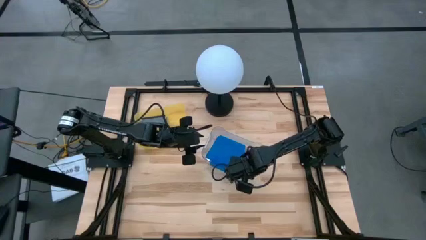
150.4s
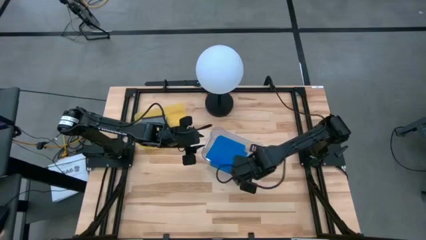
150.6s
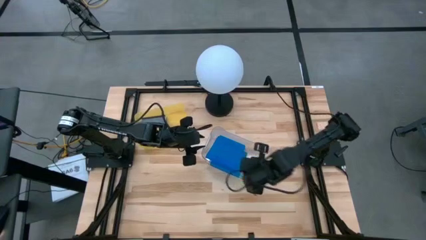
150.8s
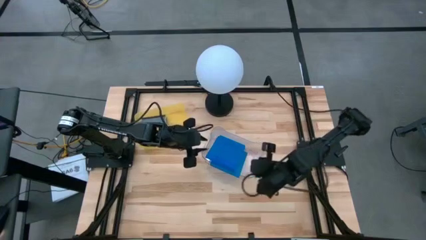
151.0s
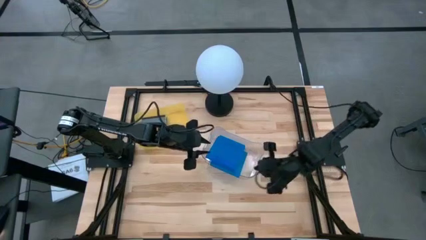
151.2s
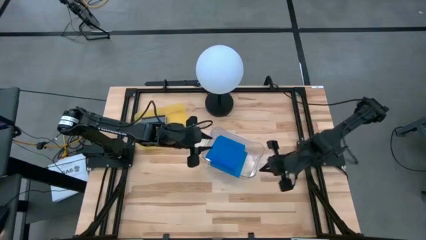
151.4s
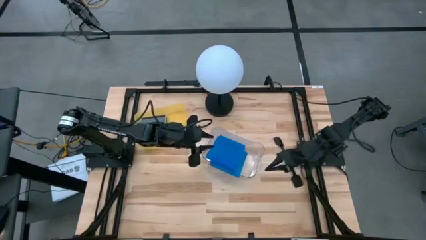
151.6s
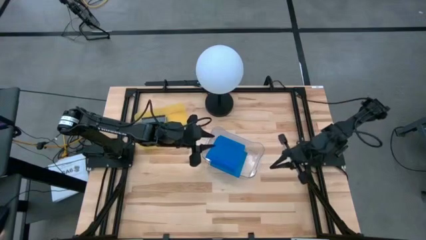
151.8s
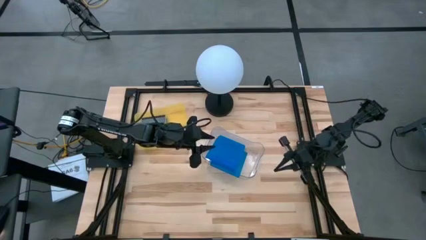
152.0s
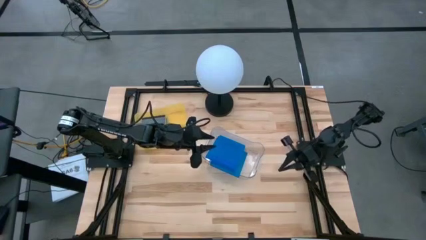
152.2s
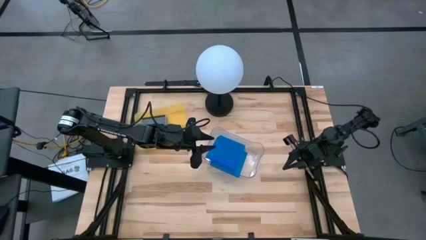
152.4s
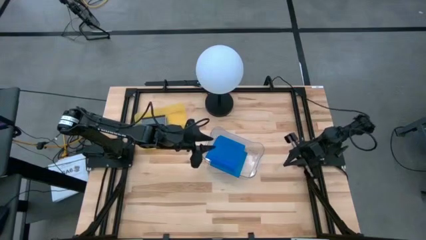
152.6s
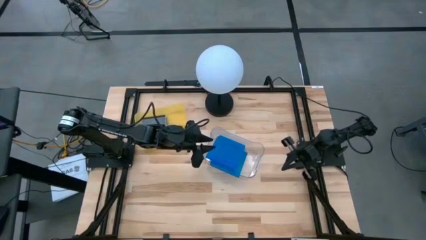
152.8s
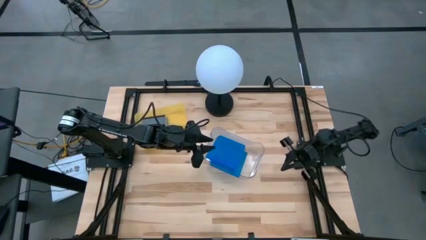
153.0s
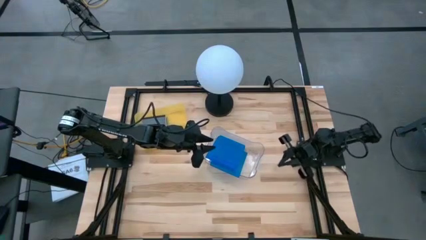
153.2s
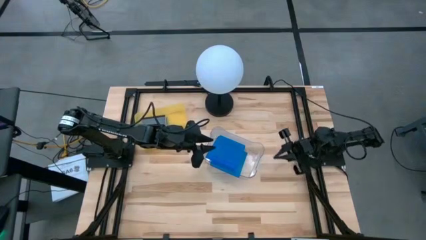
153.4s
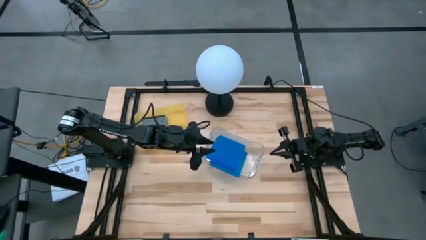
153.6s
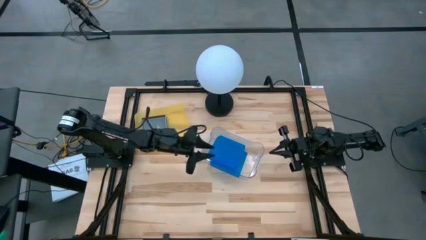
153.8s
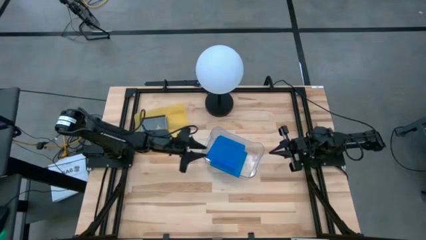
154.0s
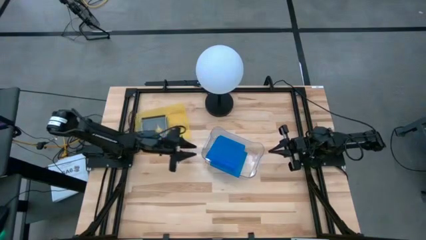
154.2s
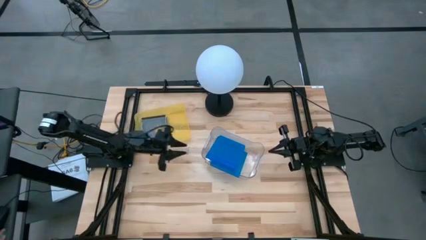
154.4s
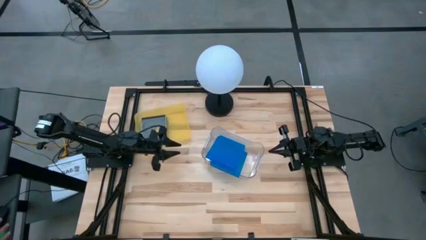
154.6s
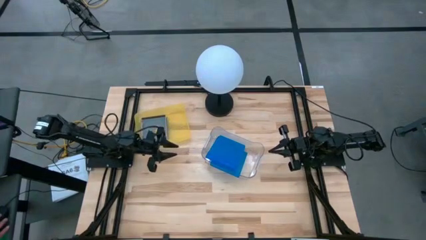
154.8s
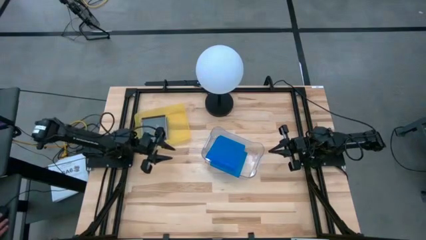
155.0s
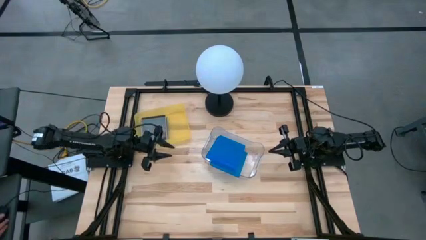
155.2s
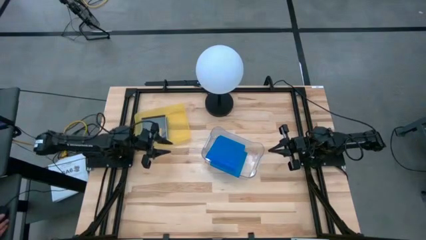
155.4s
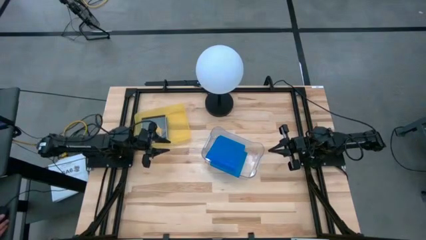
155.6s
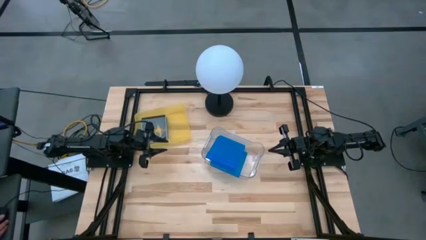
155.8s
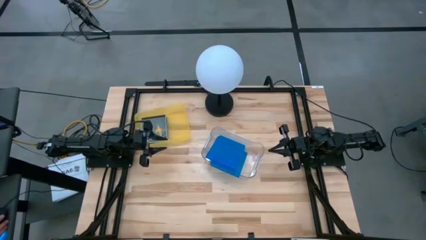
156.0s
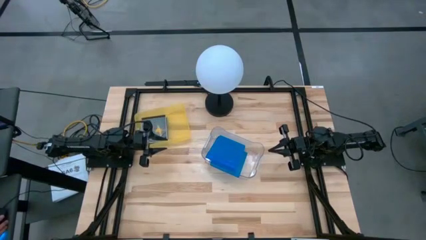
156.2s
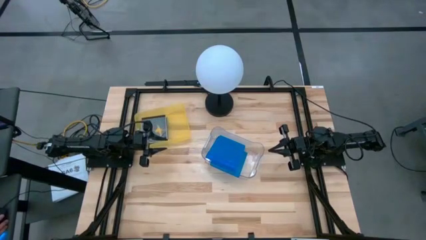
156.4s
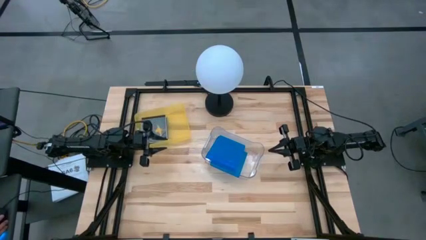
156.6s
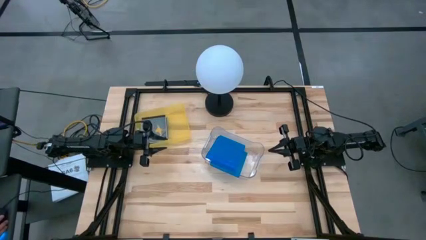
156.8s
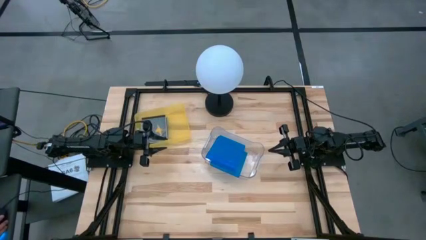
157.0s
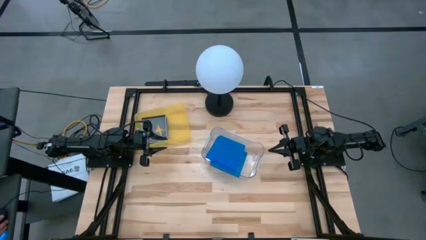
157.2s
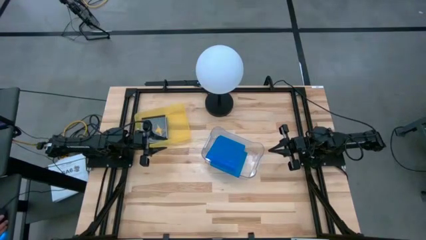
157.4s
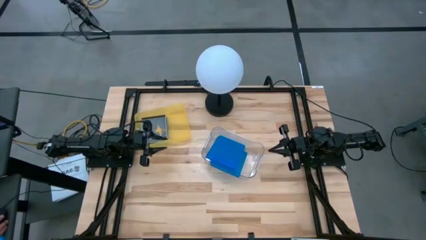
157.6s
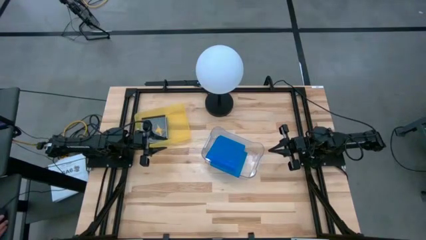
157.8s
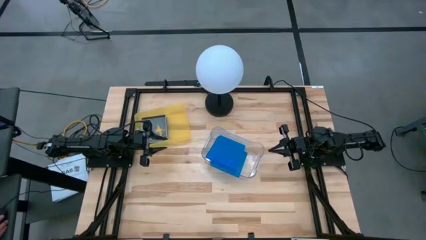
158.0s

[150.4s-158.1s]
Task: Pick & place jewel cases by type
Return to Home Position

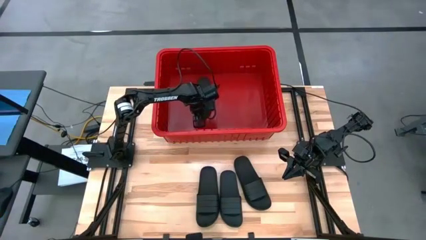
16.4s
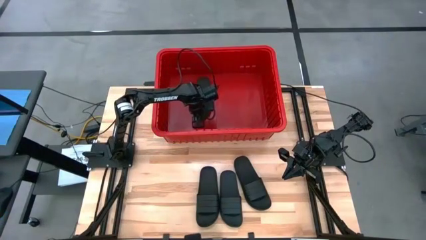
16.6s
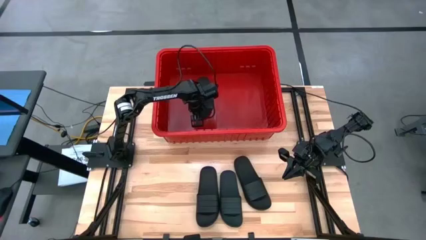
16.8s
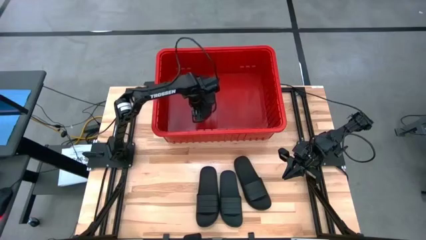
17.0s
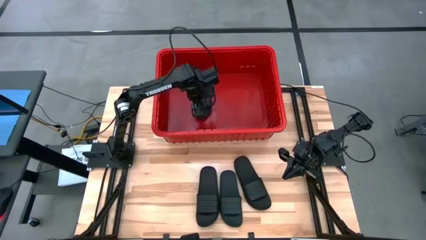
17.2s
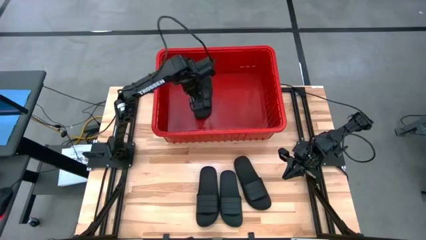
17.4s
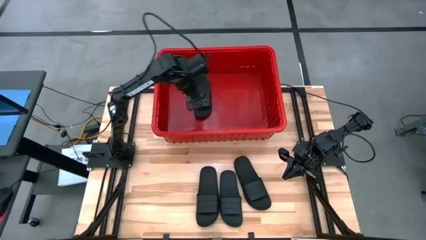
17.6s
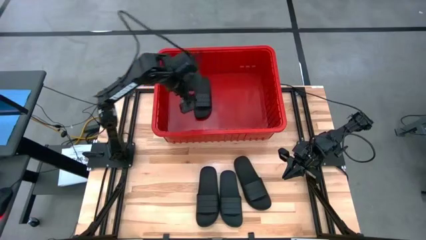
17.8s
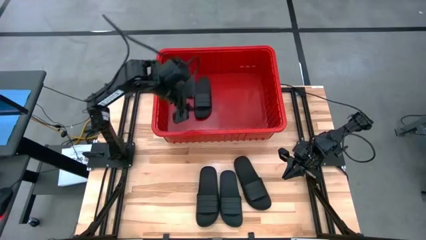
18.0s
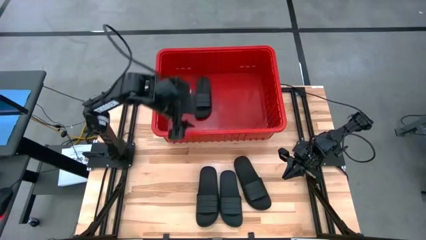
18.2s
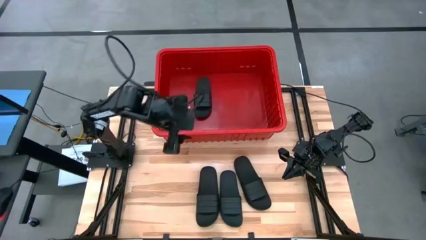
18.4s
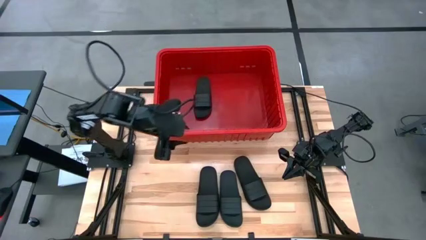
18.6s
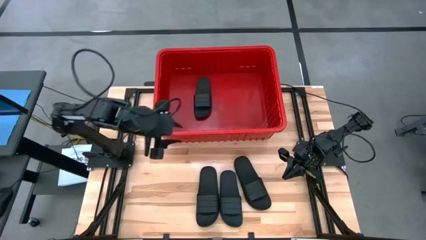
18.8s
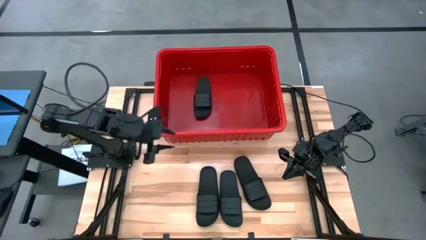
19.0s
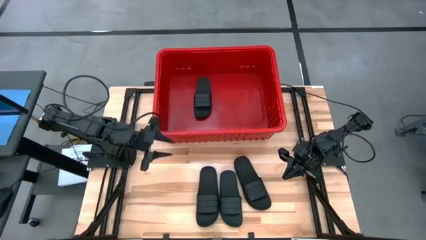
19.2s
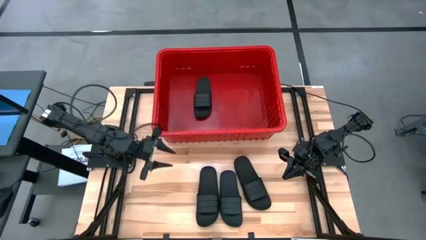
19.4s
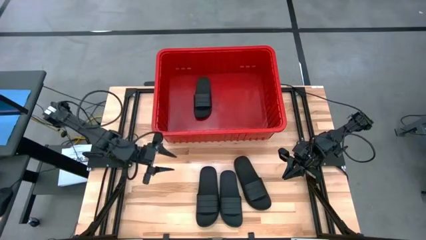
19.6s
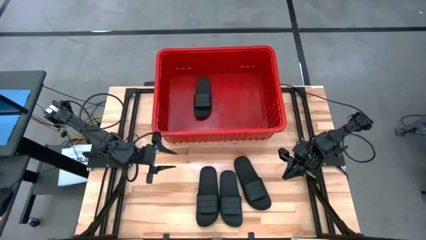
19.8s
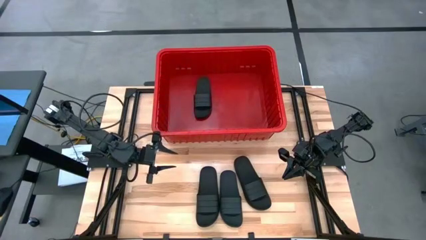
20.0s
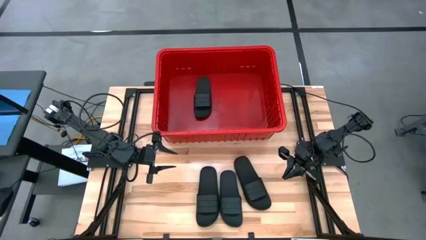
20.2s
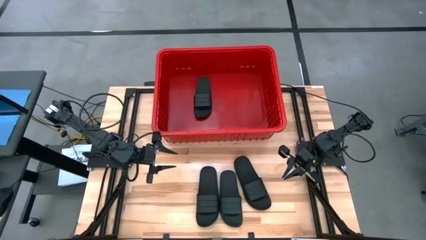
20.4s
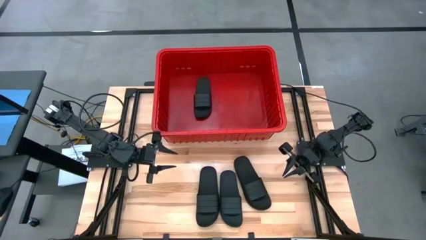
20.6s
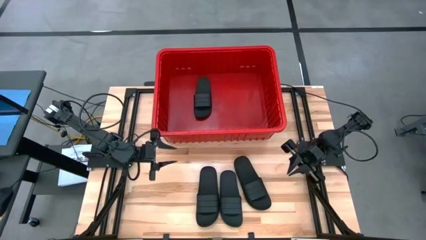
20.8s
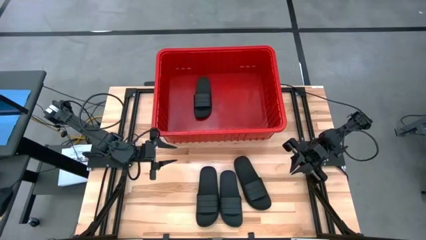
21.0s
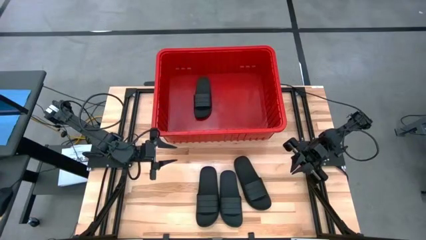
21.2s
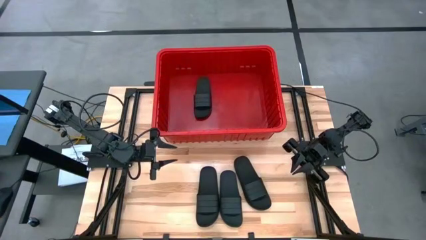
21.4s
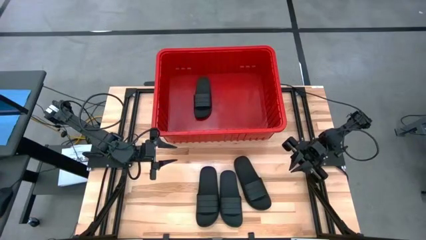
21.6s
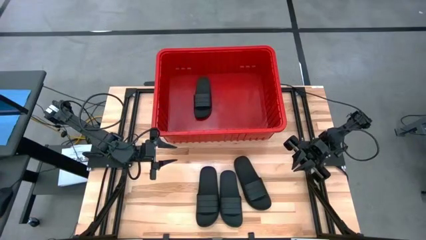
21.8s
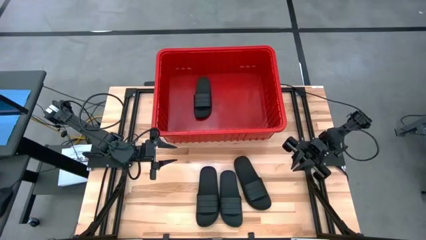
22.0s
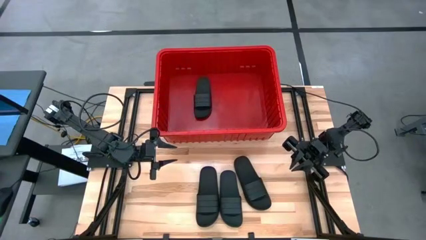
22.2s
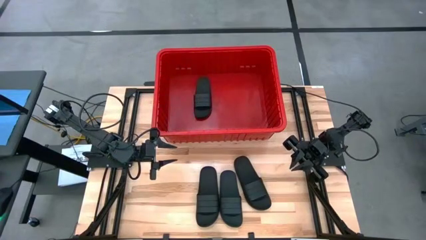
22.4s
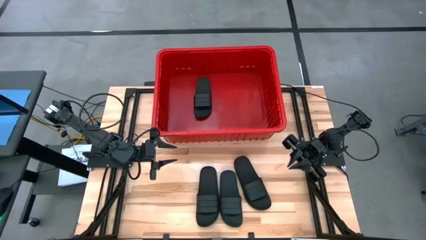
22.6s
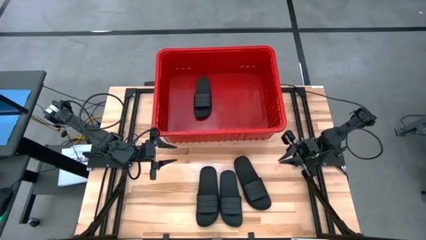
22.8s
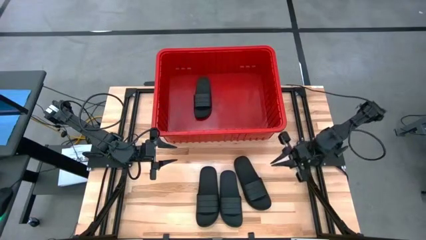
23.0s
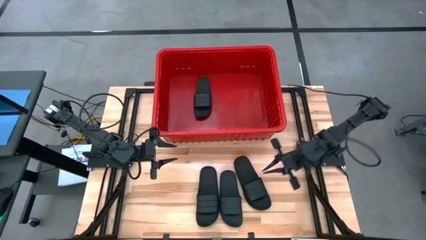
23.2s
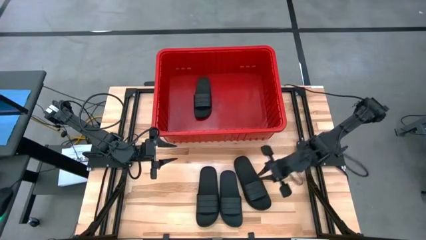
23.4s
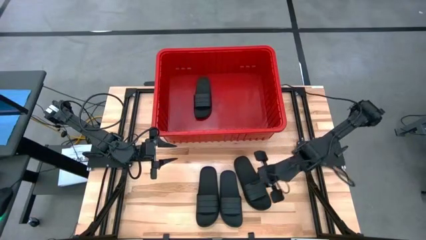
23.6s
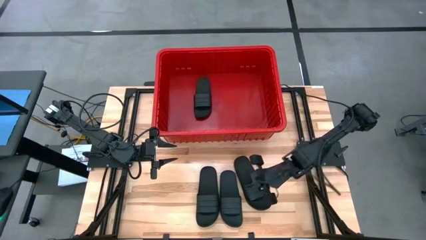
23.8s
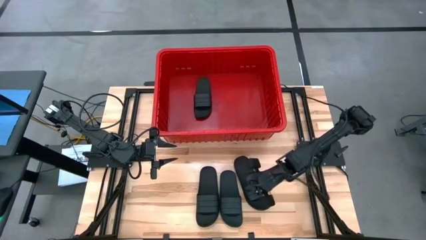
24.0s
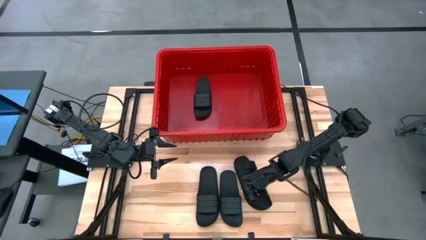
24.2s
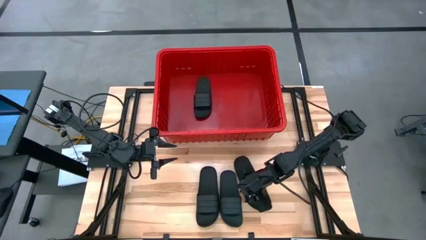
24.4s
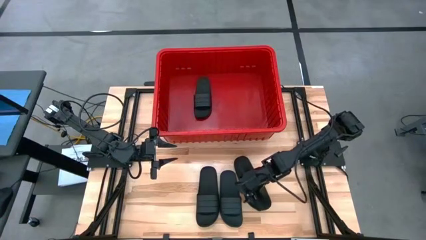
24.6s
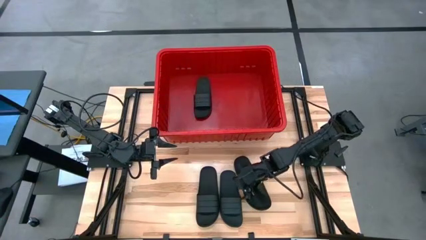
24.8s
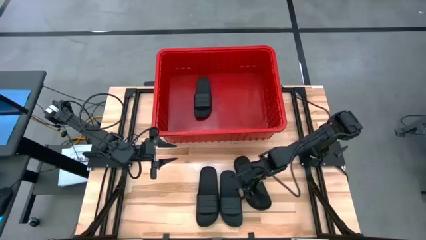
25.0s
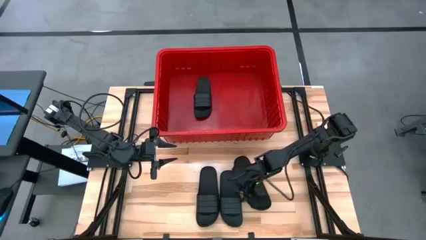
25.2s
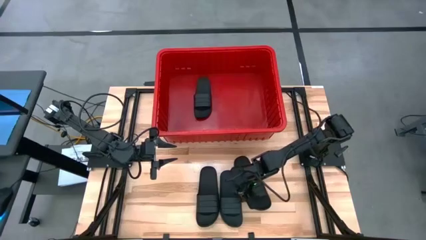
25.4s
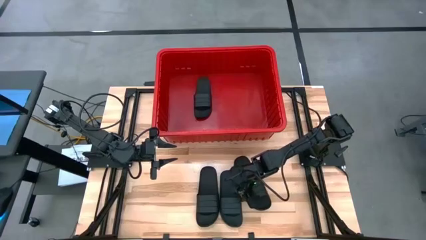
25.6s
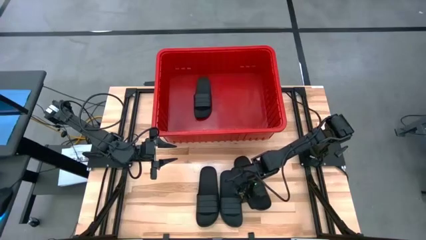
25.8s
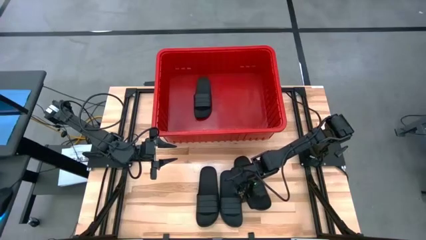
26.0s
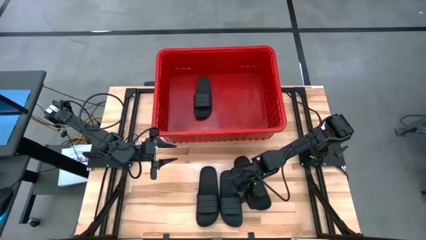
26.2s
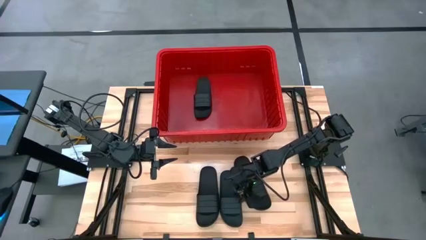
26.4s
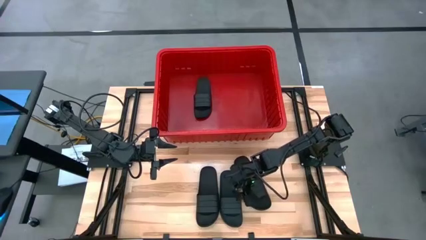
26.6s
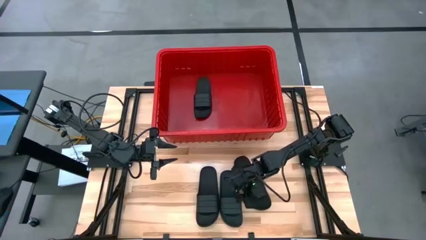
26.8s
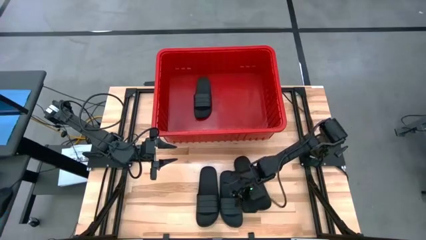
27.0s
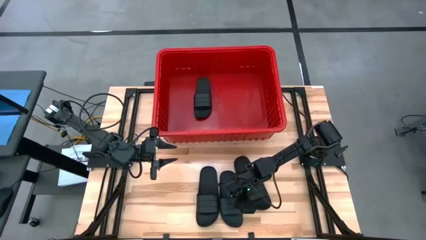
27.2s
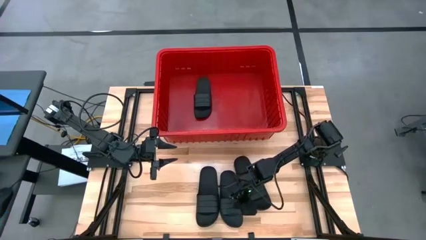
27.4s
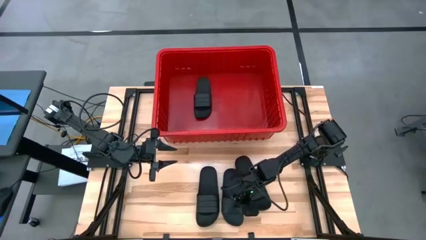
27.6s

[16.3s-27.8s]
Task: Pick and place slides into bin
Put the black slide into the red container
